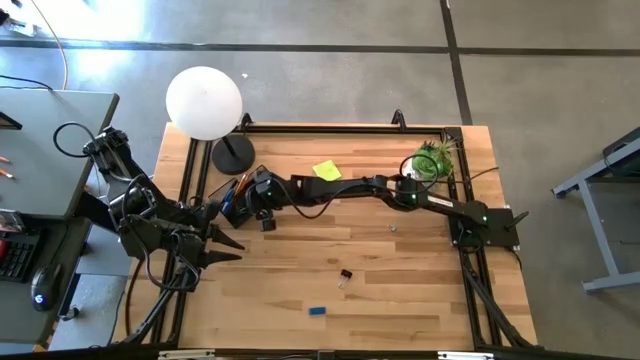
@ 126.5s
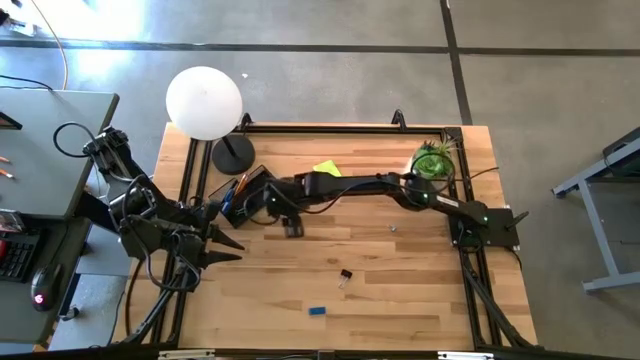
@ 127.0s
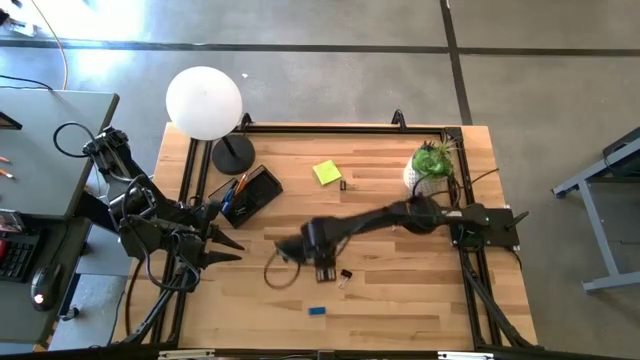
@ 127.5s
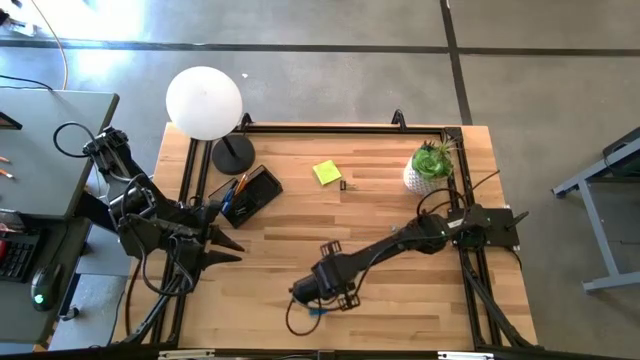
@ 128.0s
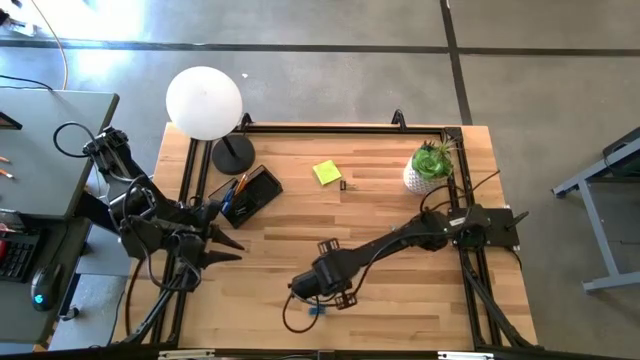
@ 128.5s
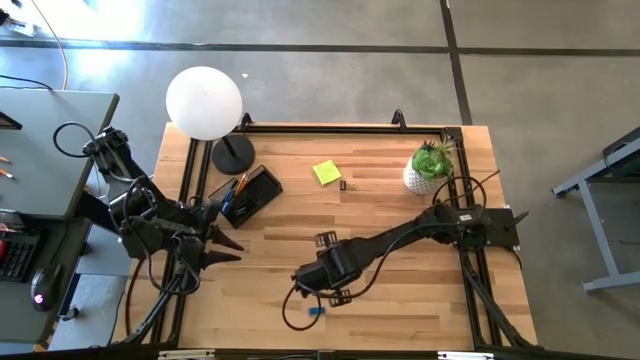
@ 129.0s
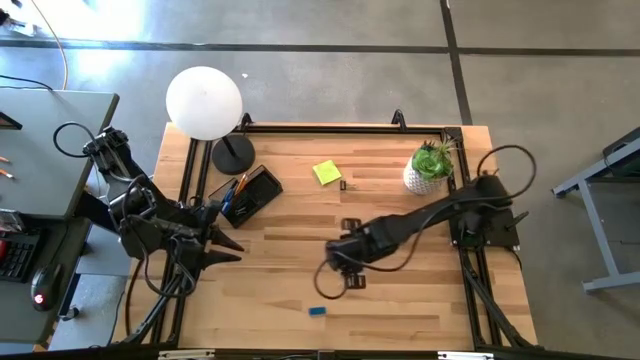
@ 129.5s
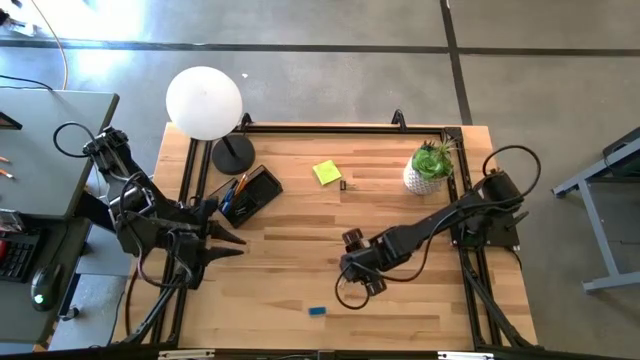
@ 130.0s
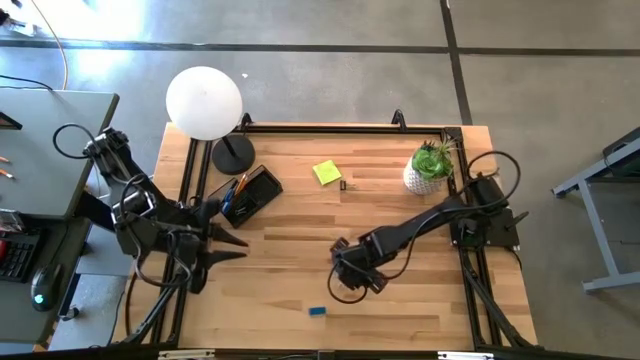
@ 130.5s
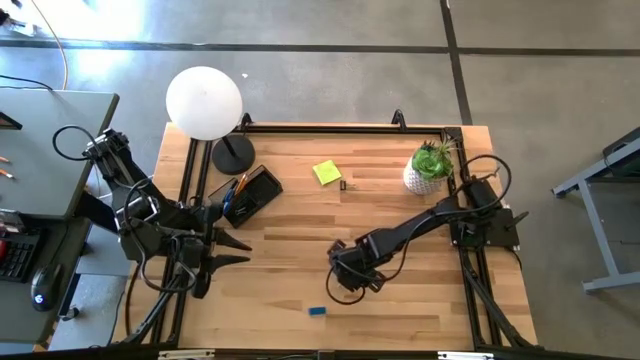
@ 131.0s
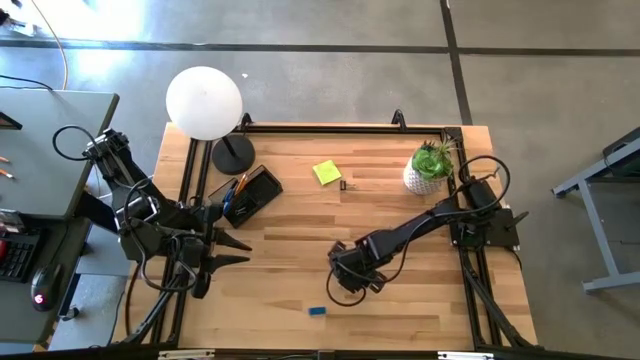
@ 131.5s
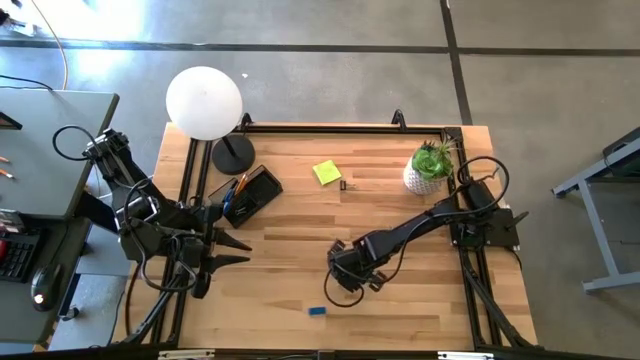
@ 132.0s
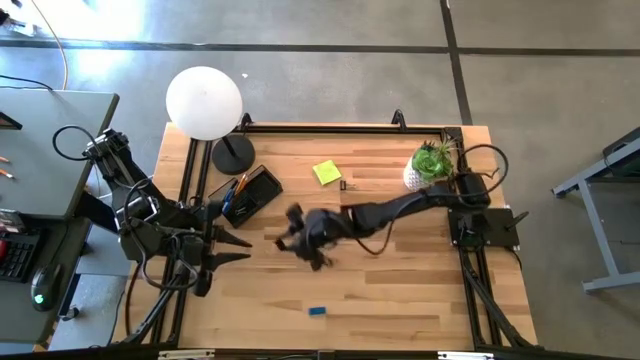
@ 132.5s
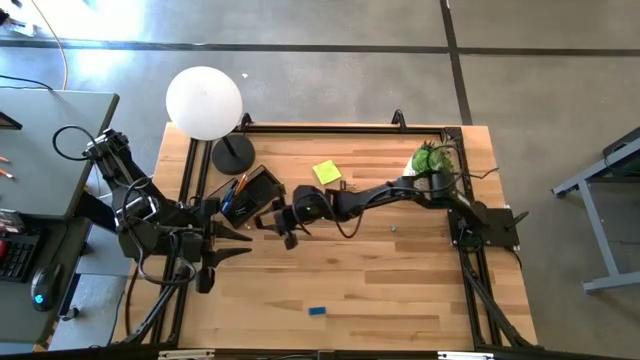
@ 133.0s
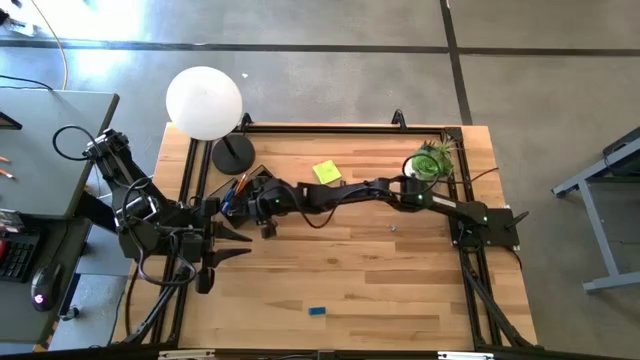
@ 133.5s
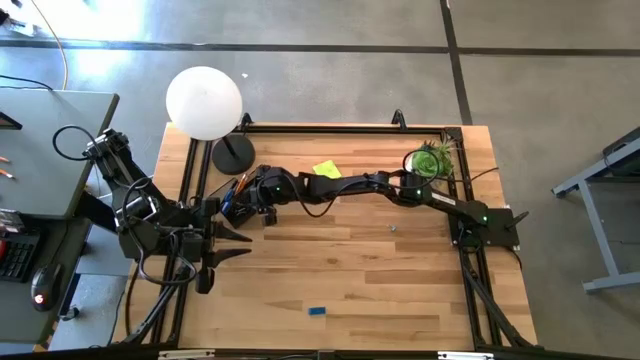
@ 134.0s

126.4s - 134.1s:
Task: Pick and place office supplies into organizer
Put the bottom black binder clip into the black mesh desk organizer

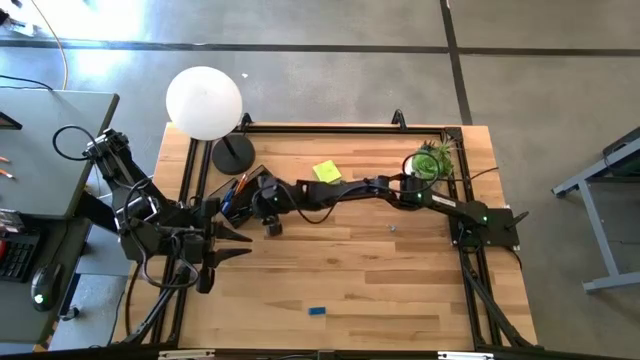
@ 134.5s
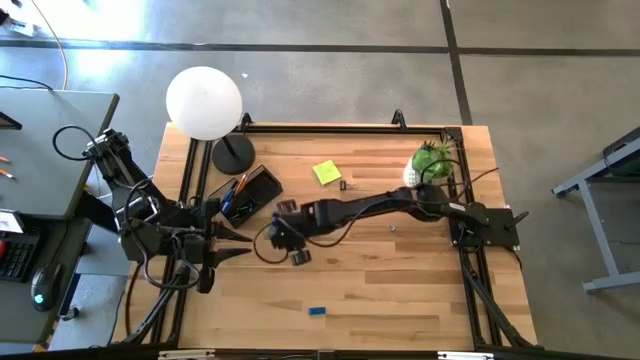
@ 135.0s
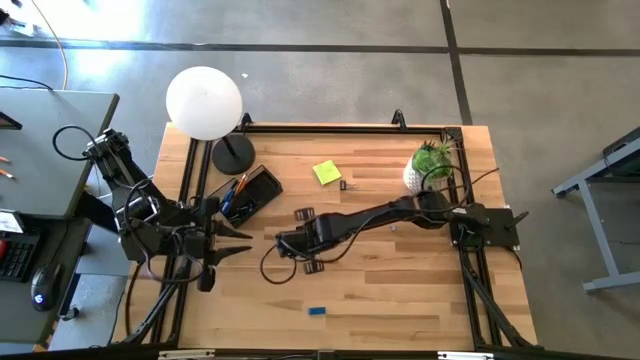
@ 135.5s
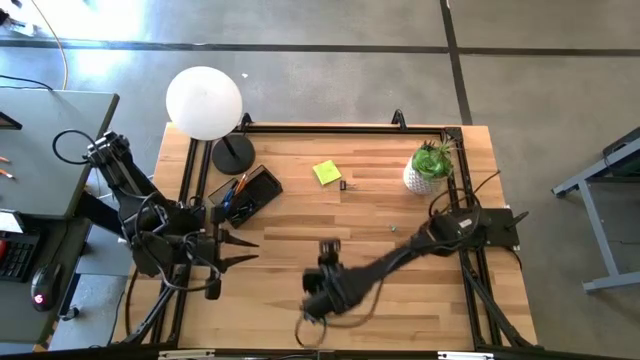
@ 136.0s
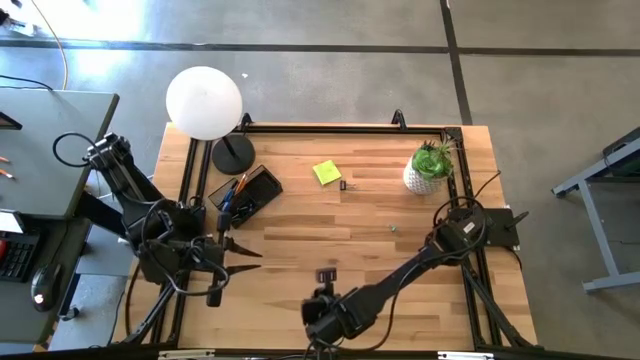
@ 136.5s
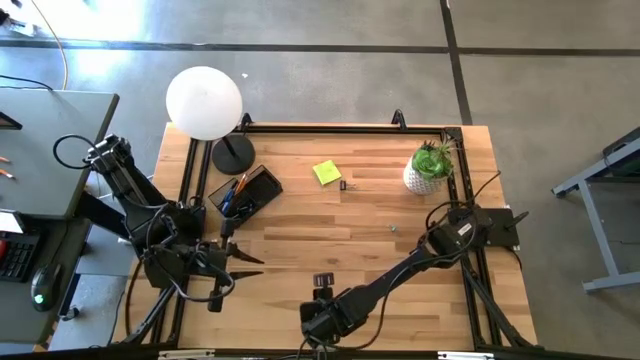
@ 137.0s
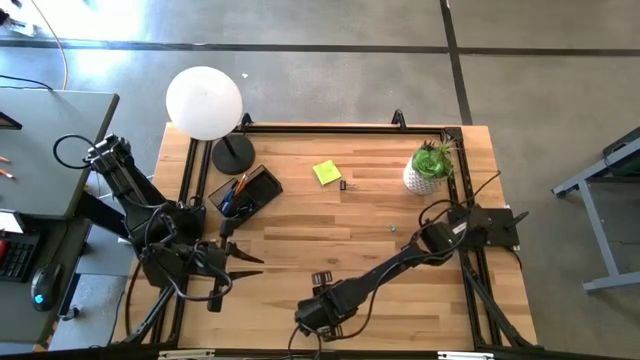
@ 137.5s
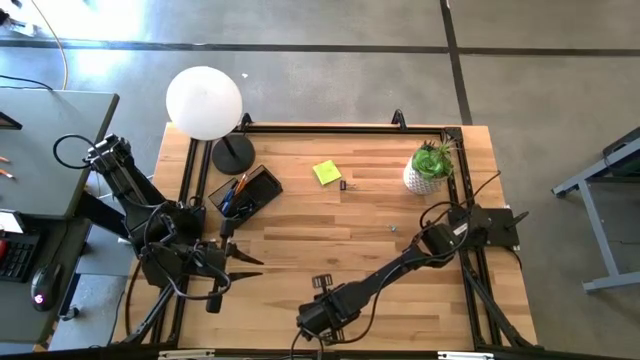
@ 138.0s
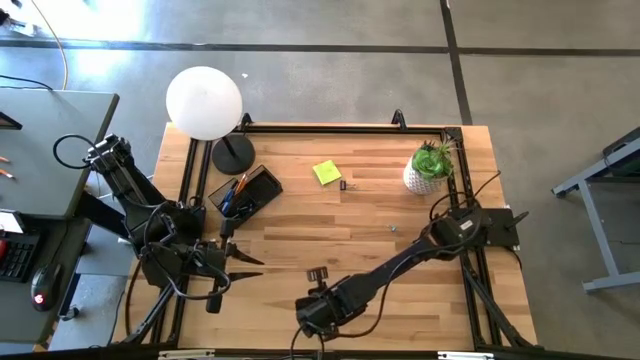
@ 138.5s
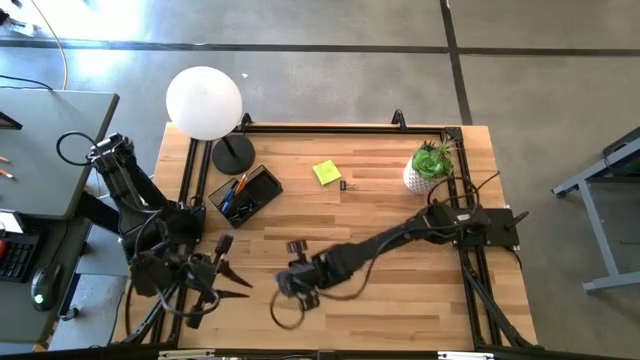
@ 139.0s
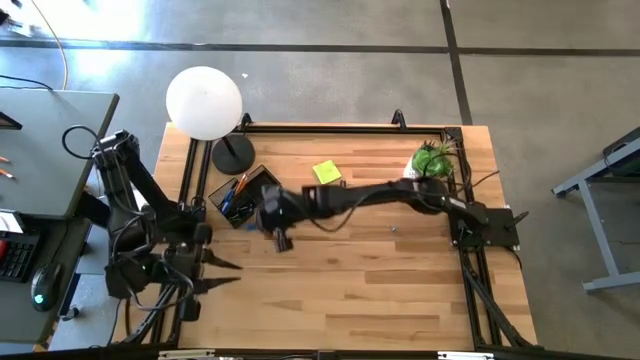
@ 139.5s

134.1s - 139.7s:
Put the blue eraser into the black mesh desk organizer

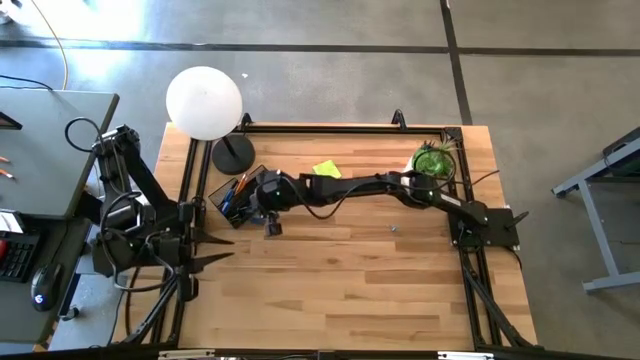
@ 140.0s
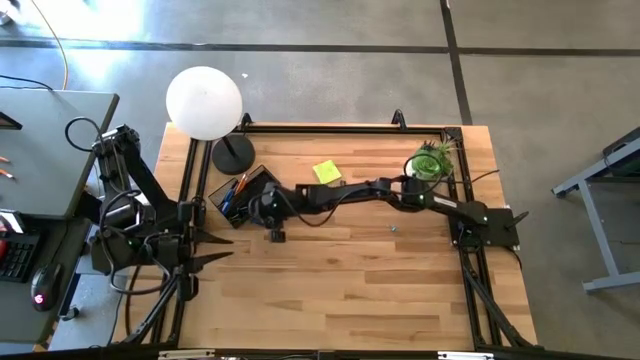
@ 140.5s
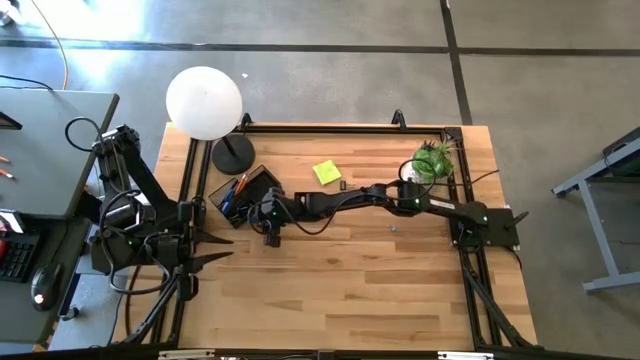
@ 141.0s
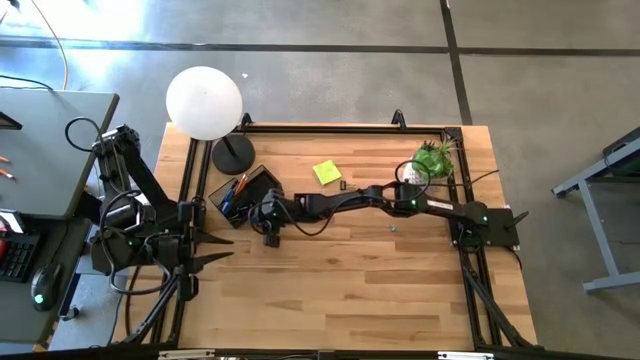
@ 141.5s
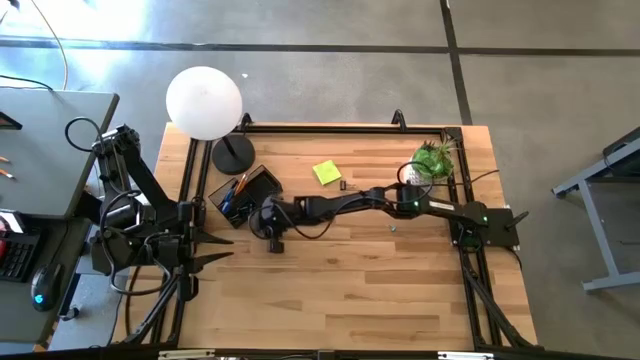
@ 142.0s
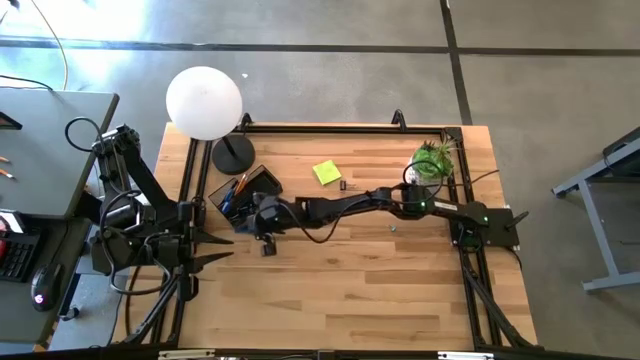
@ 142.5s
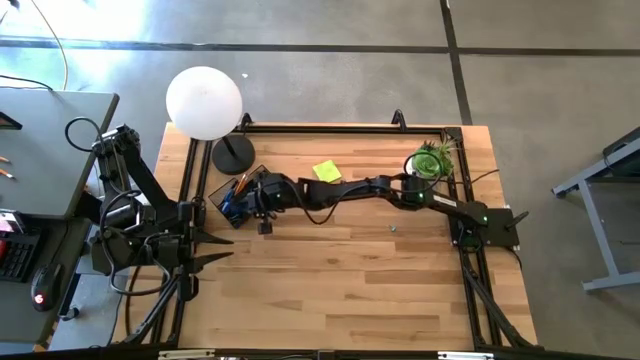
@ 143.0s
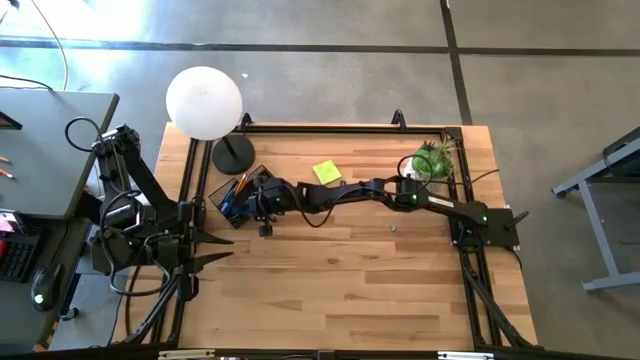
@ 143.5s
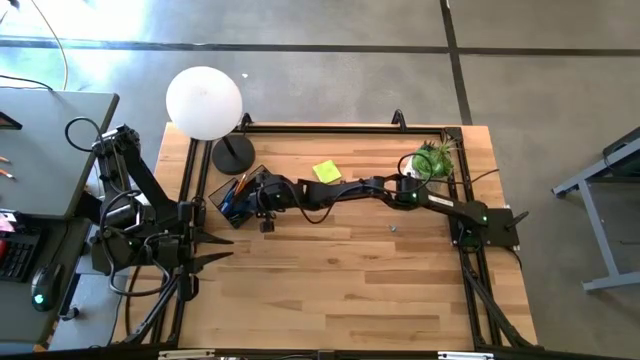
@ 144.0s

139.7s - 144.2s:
Put the blue eraser into the black mesh desk organizer

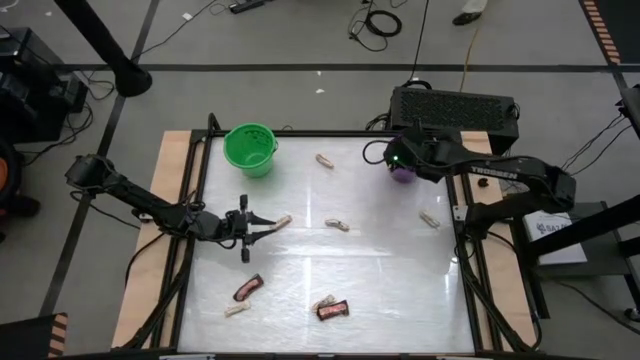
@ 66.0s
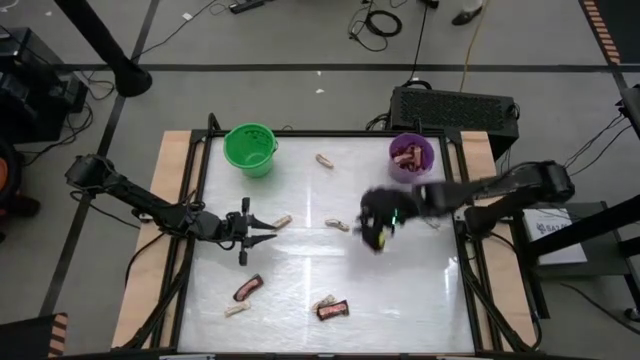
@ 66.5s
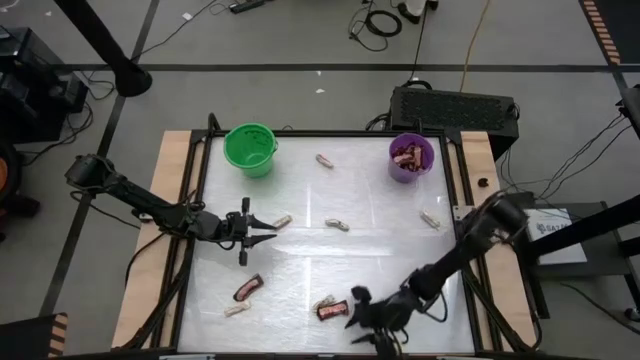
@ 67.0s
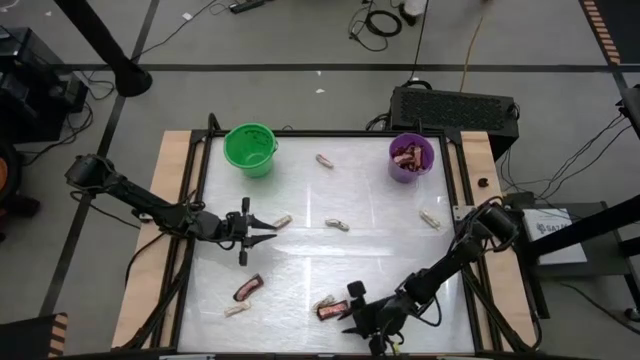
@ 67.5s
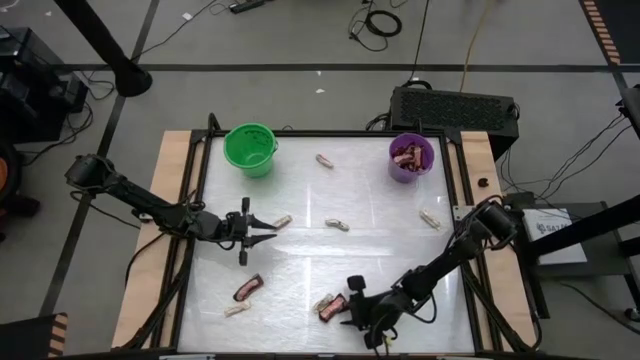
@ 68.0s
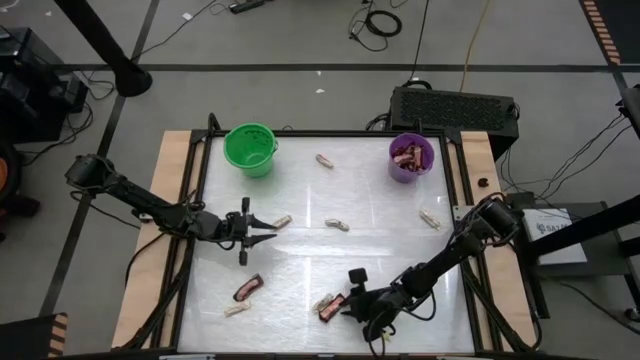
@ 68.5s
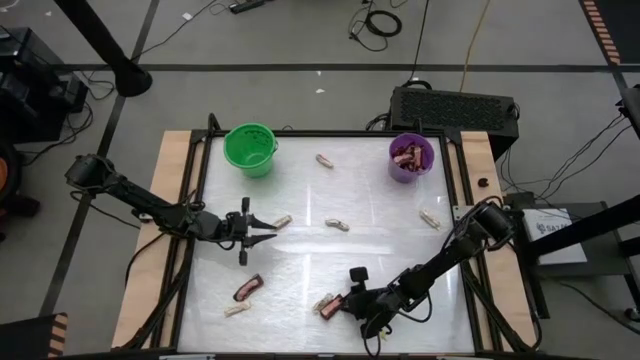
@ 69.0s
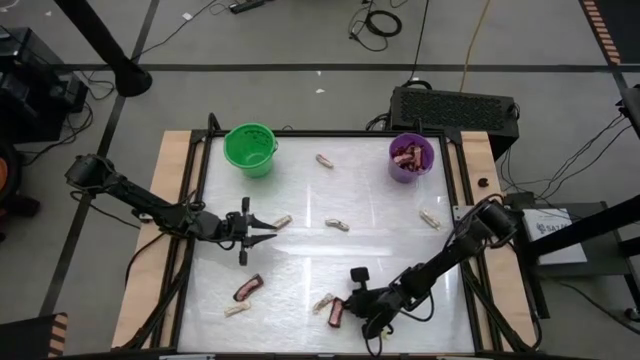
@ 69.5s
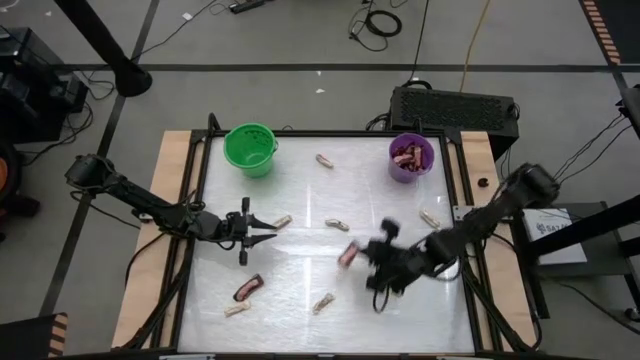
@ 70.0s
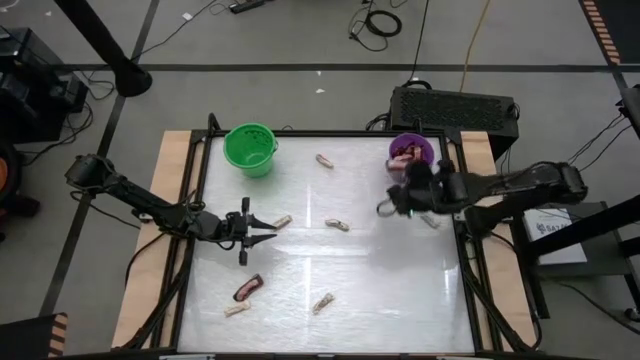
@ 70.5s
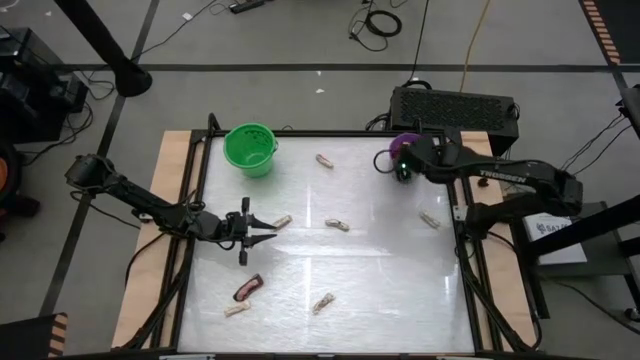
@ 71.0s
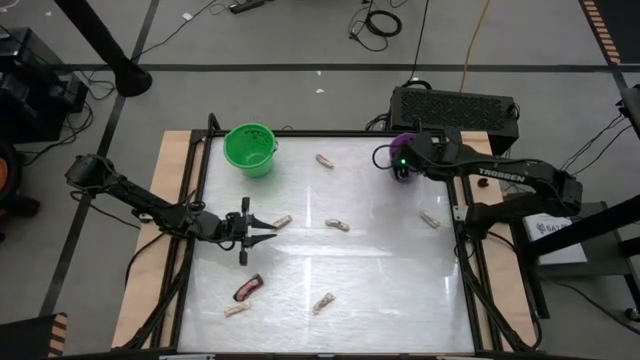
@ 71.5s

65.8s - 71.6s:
Task: Sort candy by brand, put in halloween buckets
Put the brown chocolate bar into the purple bucket
